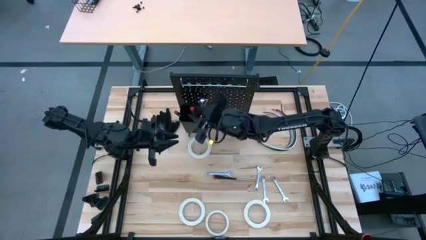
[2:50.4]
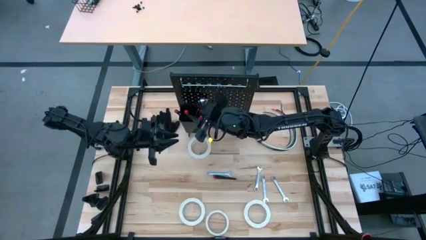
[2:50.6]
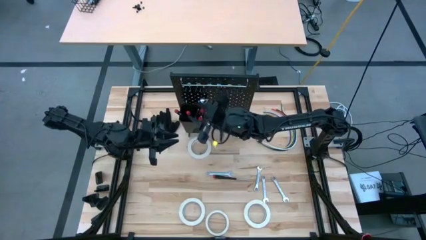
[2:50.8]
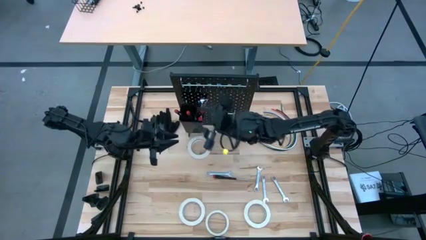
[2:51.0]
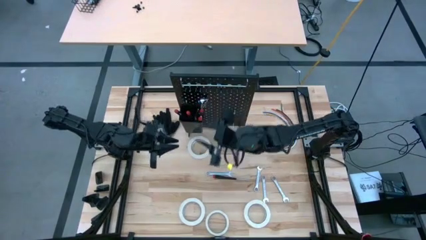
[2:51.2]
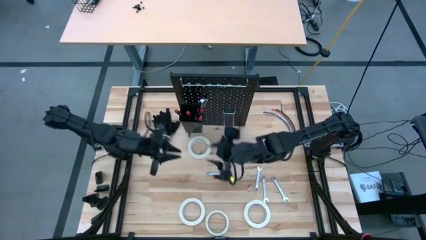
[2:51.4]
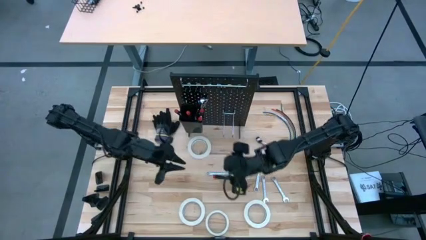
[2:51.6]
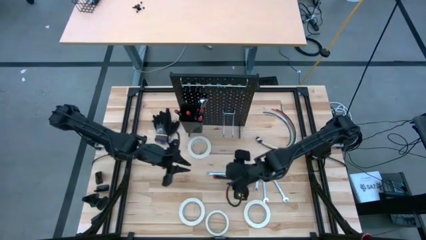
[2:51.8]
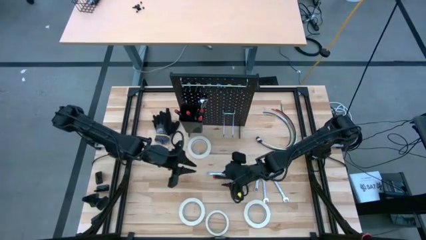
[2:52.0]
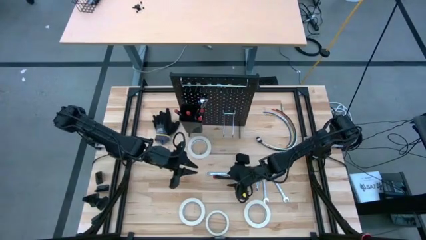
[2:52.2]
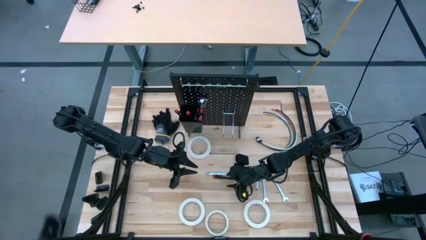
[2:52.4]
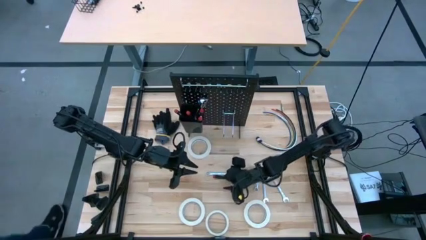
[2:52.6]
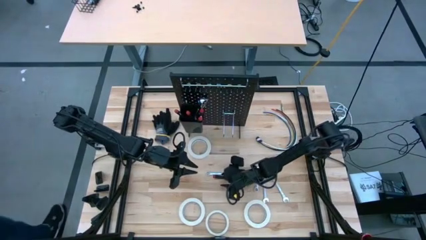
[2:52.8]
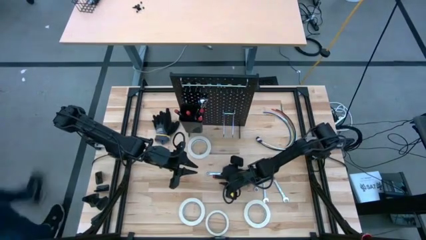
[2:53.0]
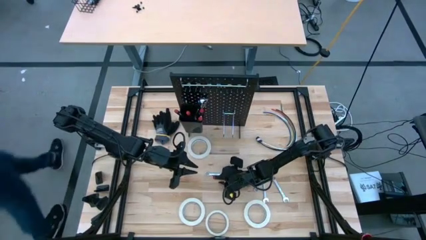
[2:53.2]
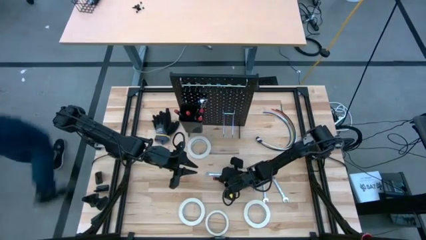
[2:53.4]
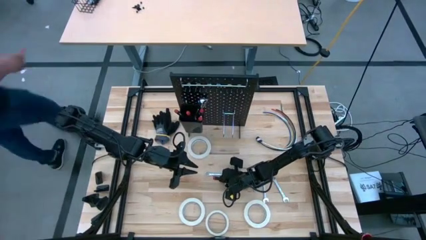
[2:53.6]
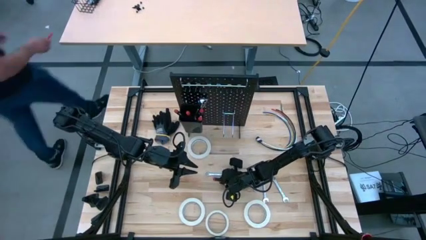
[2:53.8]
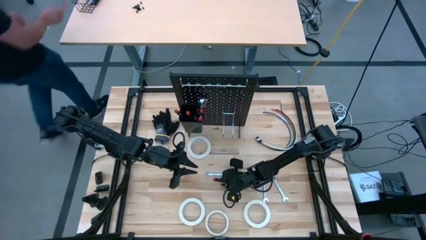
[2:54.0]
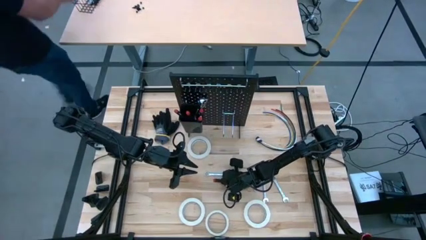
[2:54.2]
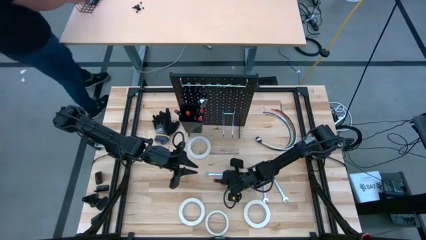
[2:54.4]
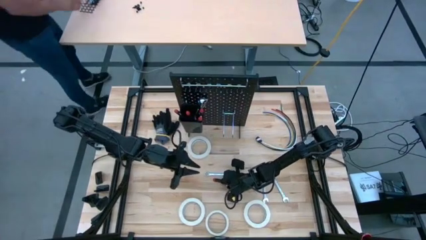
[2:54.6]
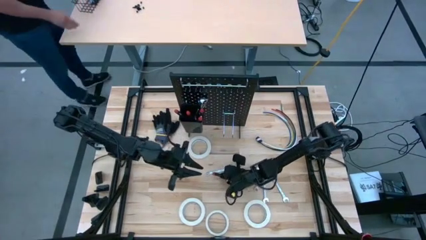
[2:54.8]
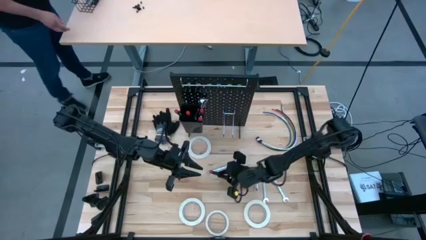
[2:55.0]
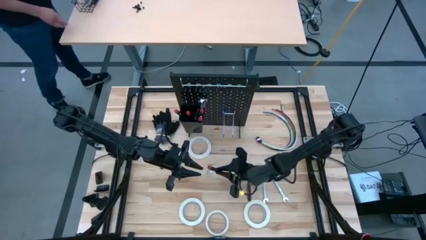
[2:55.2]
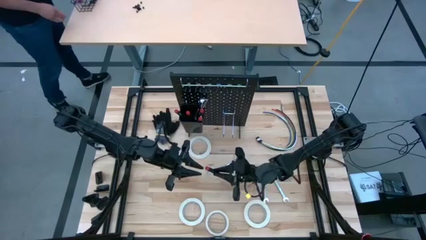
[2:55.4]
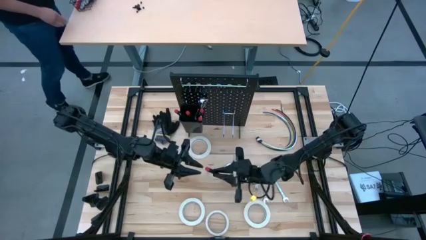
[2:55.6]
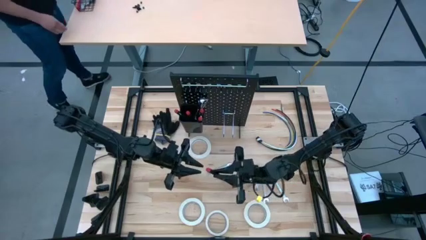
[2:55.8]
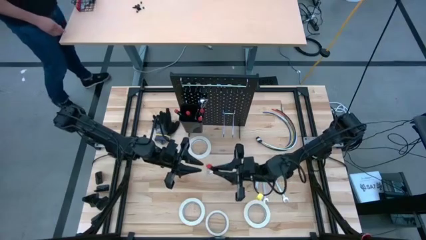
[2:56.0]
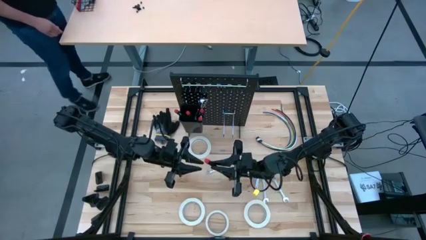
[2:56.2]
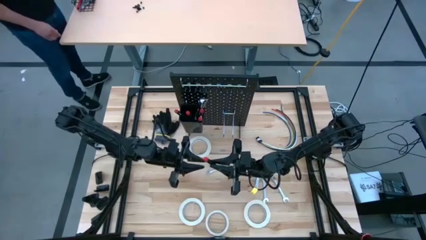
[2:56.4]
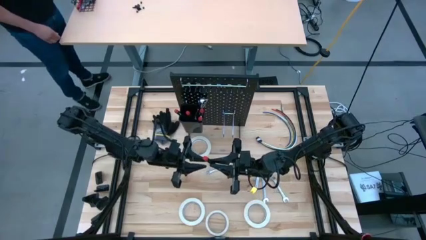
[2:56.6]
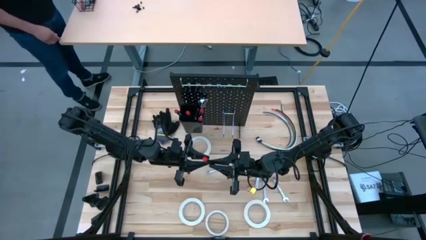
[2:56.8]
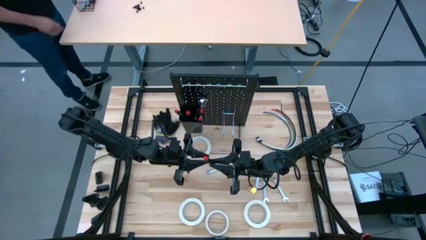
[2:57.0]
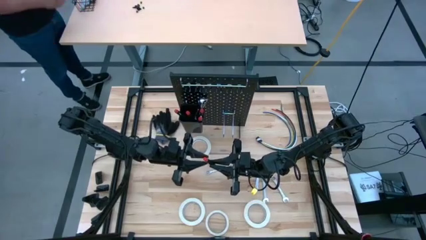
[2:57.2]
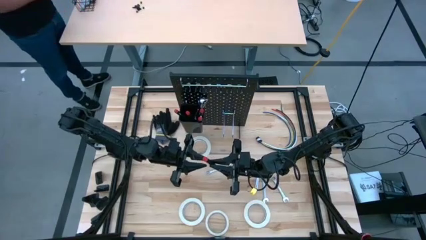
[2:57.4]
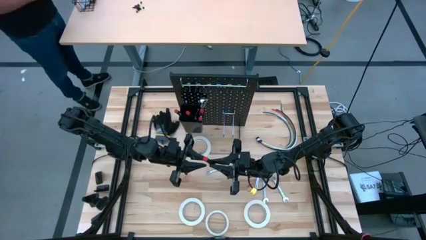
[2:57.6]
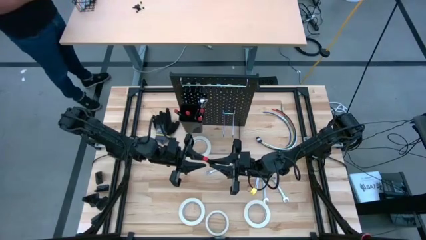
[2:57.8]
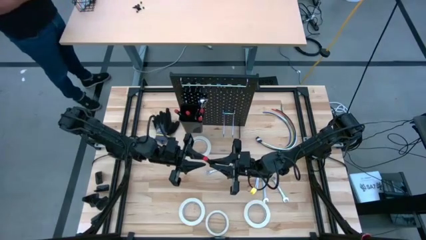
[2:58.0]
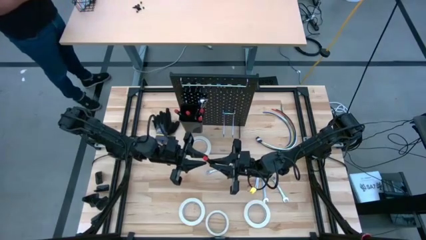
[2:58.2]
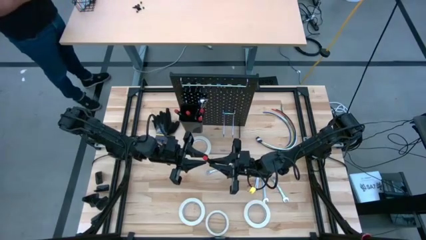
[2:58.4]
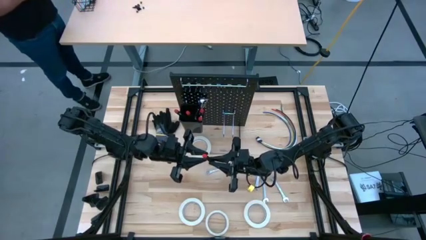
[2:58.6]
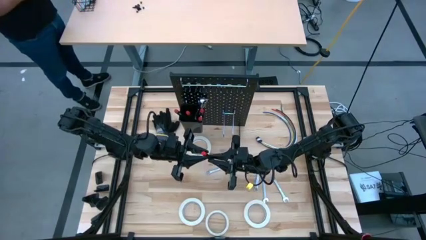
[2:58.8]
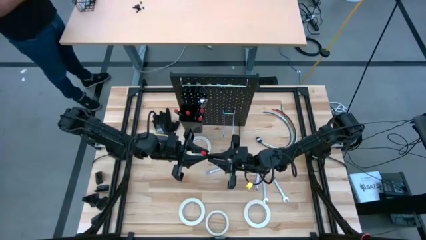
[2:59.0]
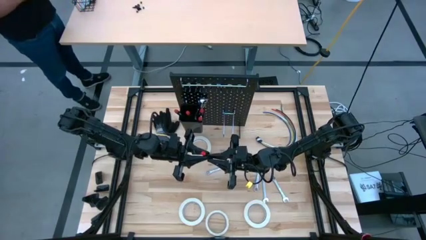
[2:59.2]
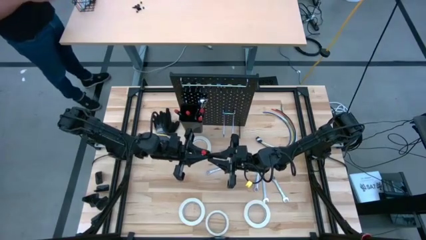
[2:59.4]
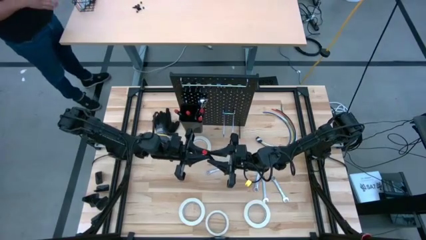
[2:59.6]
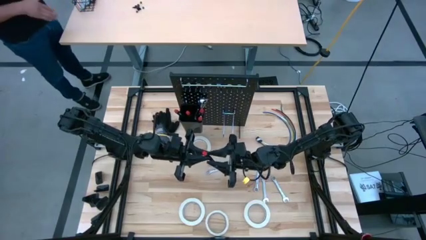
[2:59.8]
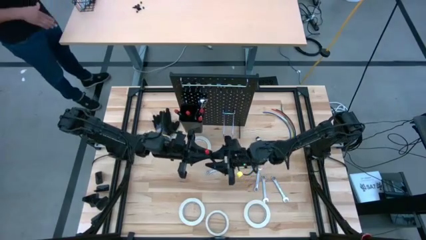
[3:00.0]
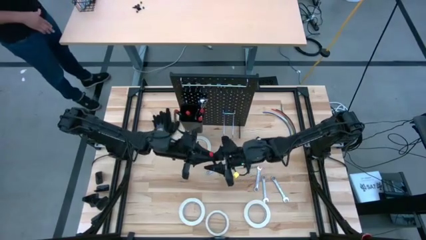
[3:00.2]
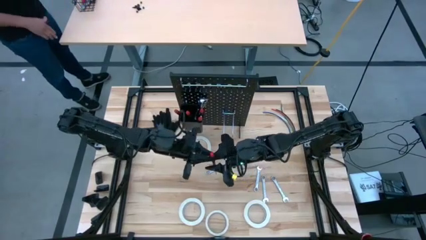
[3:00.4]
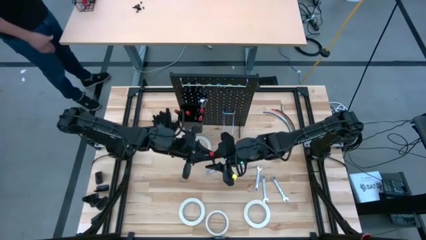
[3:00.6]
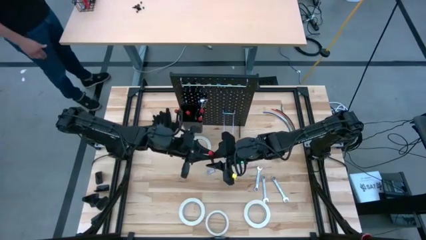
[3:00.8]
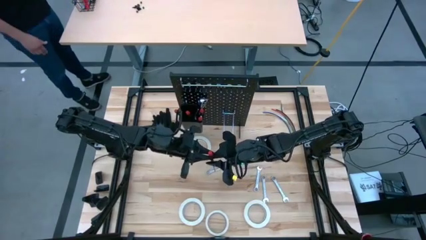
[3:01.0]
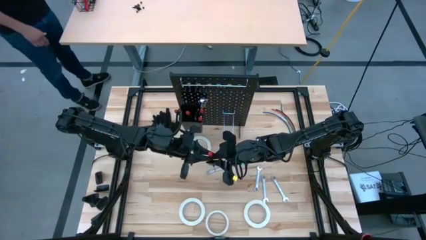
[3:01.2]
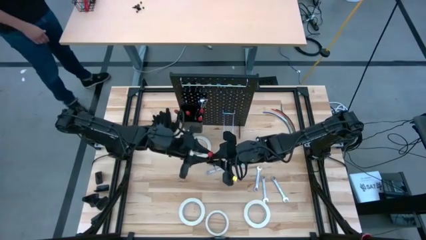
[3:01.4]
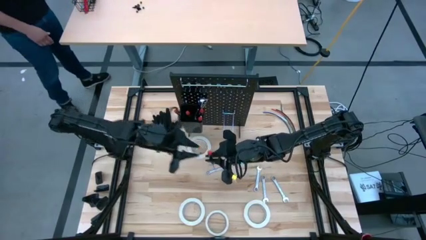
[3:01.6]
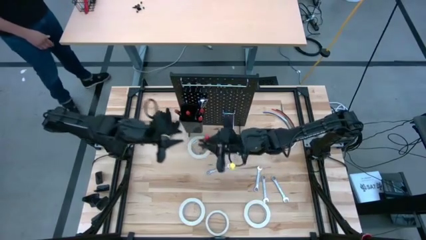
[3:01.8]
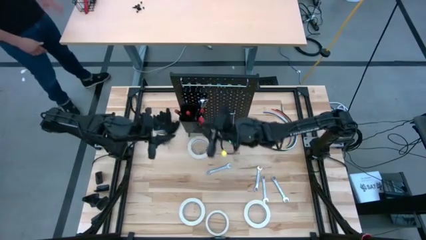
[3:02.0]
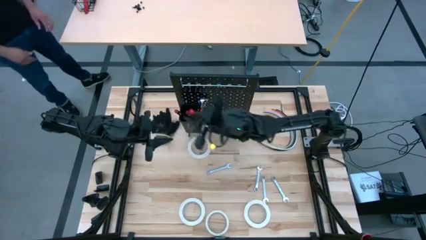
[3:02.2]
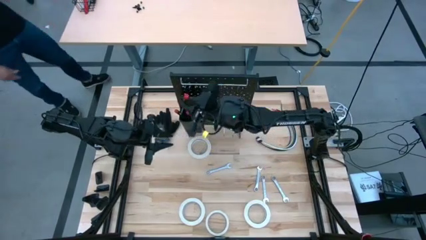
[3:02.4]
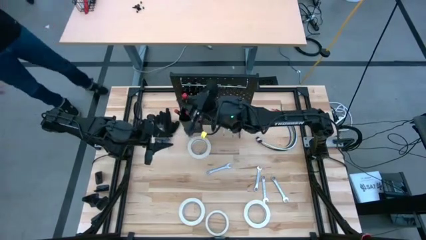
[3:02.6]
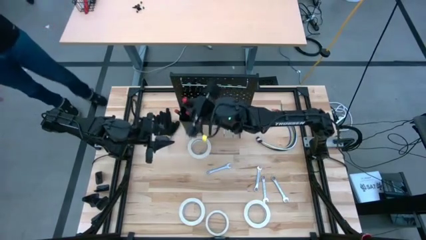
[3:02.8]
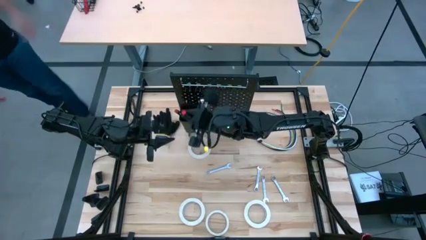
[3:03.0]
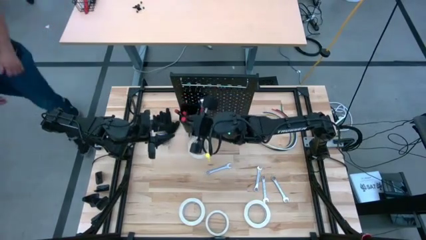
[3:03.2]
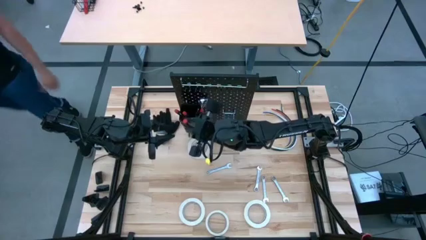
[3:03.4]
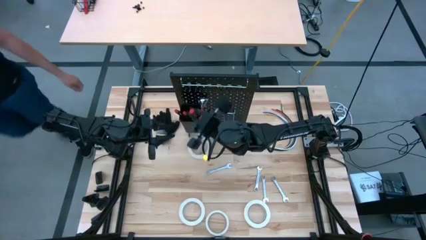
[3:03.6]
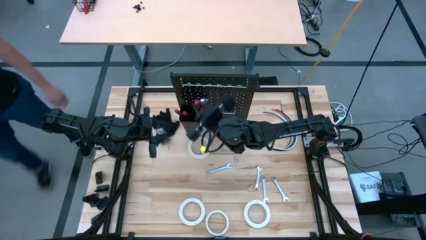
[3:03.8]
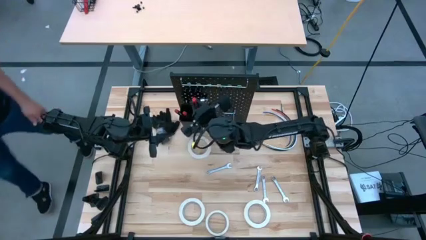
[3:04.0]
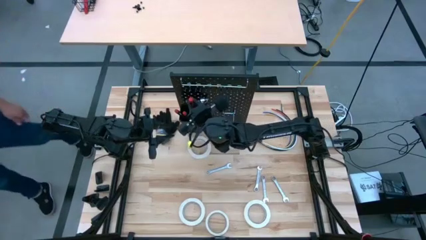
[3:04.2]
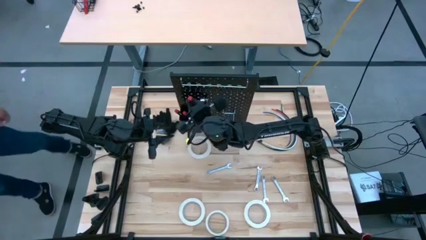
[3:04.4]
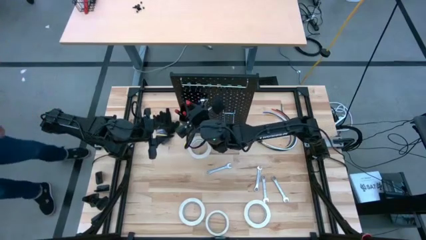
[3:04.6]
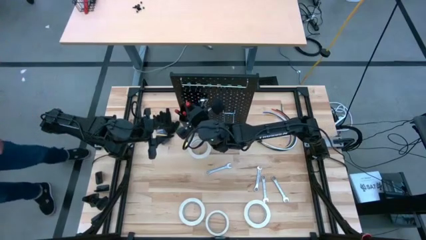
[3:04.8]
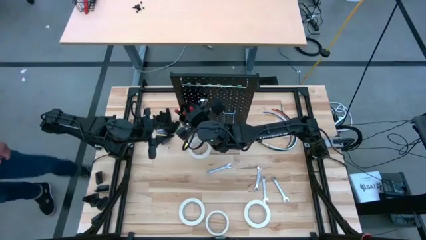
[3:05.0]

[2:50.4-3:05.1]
Task: Hang tools onto peg board
Put the black nut driver into the black bin on the peg board

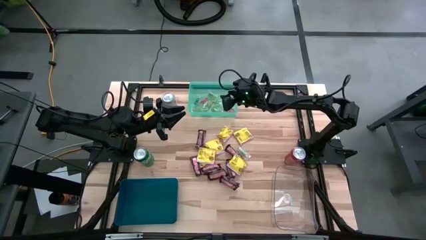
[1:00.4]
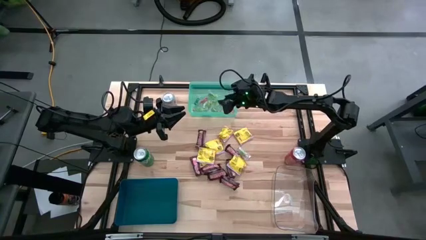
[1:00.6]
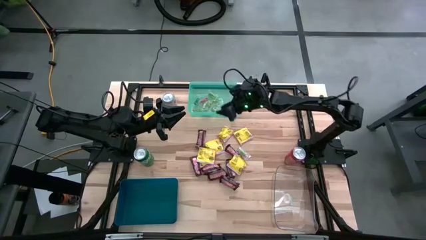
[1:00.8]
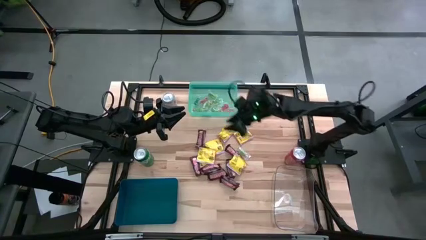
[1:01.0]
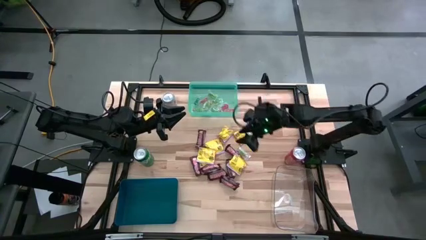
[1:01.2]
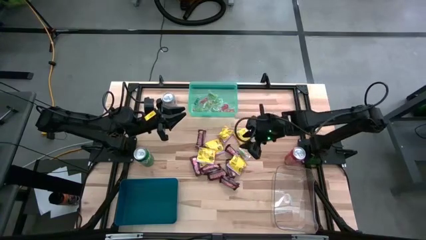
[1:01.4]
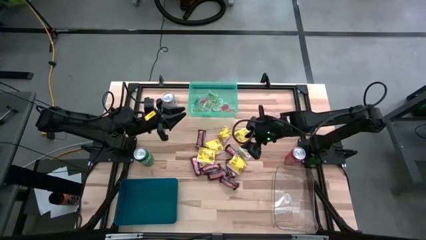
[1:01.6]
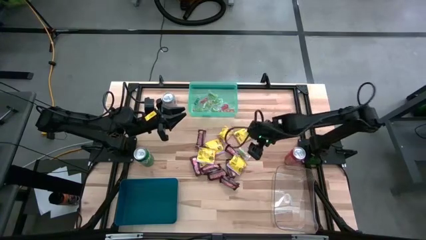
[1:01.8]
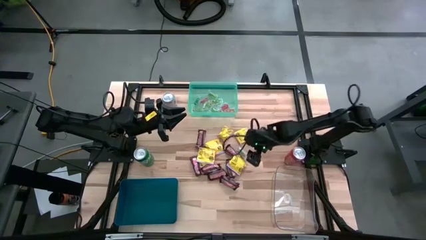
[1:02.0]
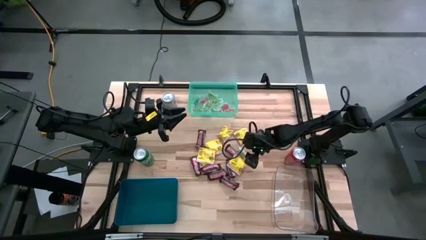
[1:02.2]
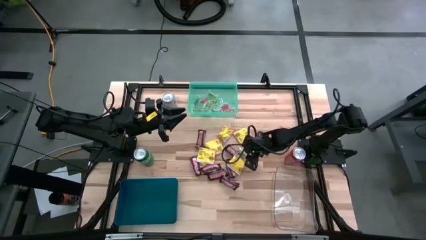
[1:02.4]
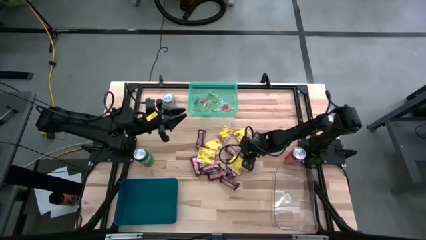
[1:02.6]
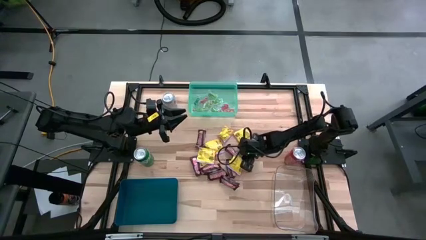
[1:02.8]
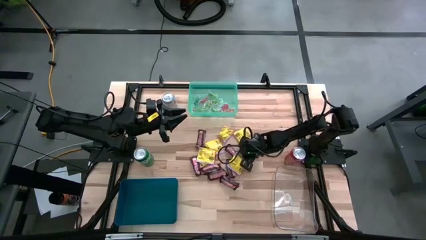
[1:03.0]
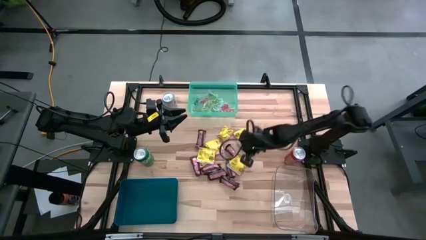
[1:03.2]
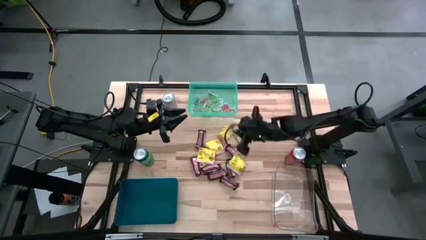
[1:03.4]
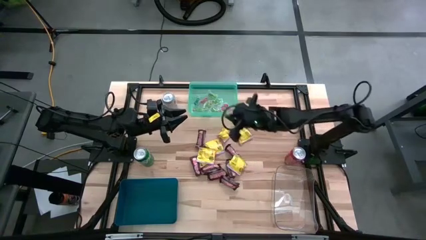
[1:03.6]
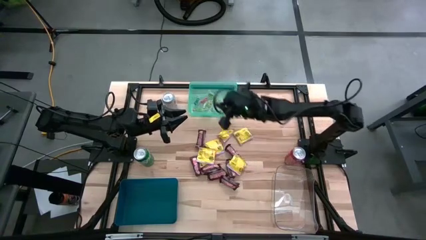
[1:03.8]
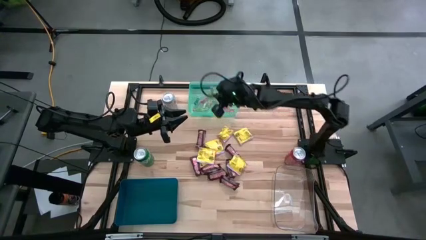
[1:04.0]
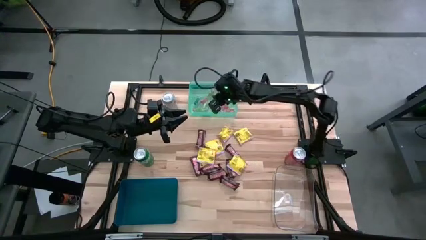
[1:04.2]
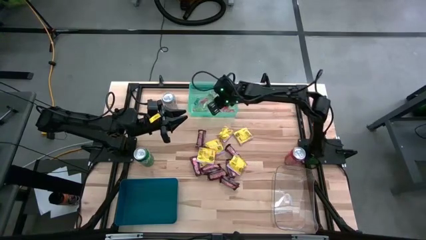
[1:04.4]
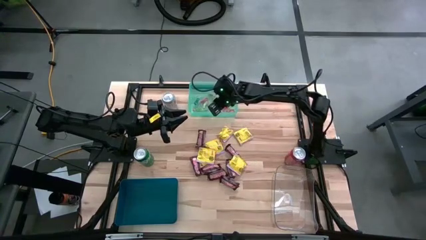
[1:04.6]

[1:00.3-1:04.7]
Task: Sort candy
Put the green gummy into the light blue bin
